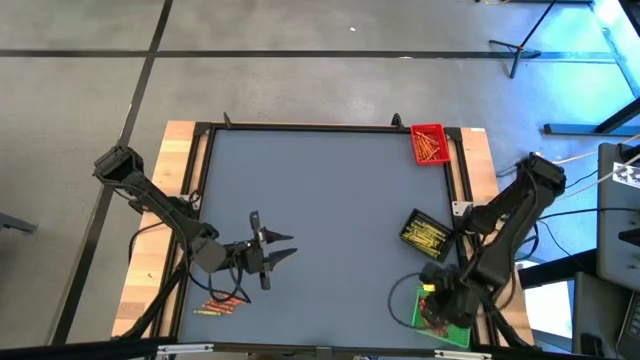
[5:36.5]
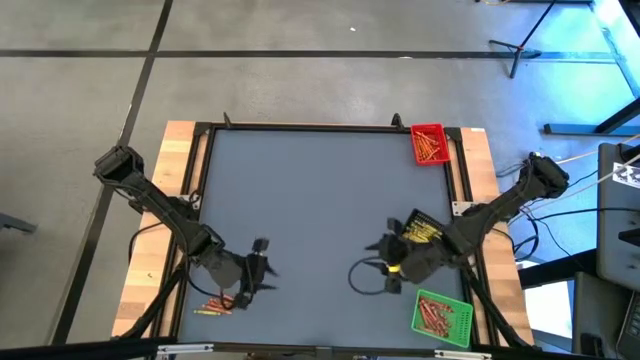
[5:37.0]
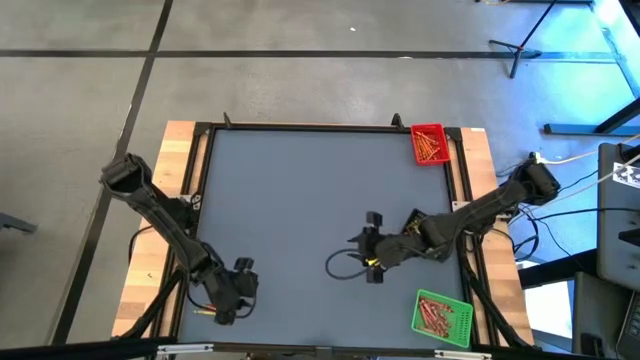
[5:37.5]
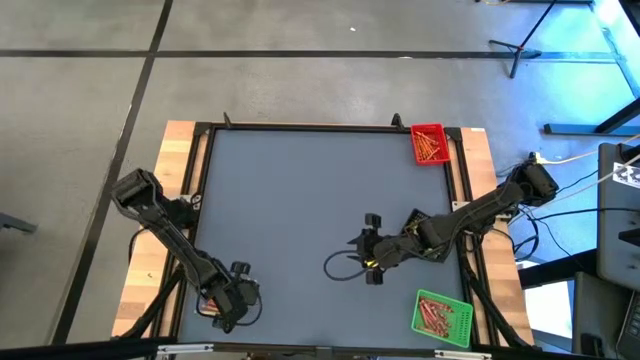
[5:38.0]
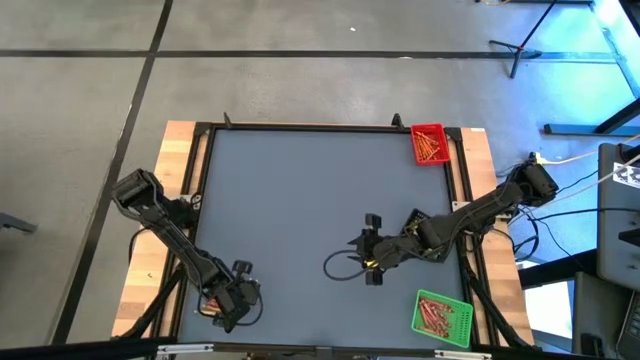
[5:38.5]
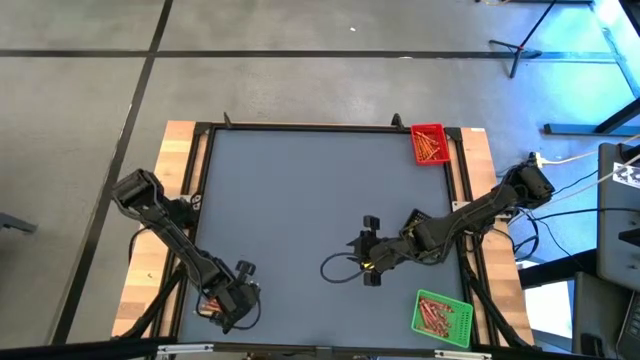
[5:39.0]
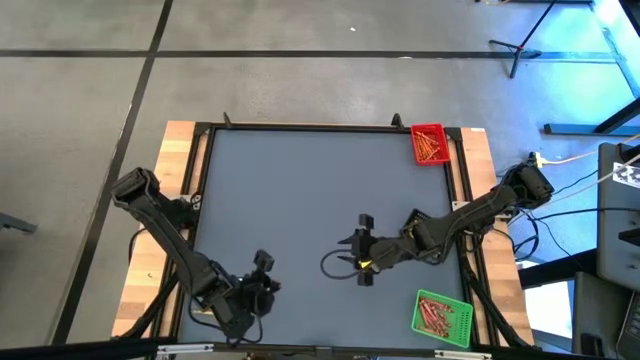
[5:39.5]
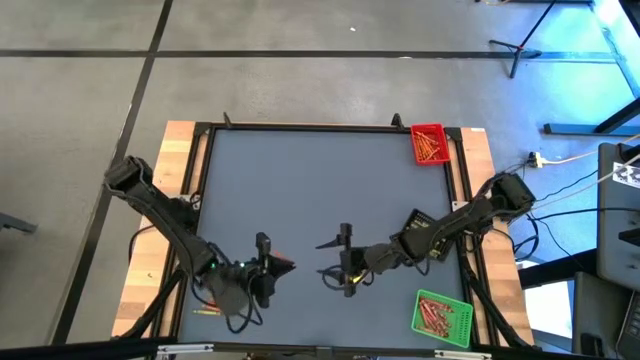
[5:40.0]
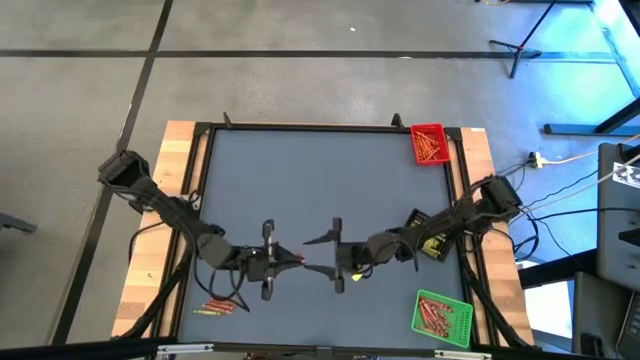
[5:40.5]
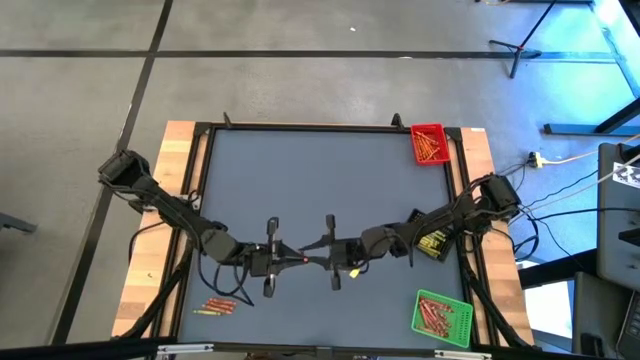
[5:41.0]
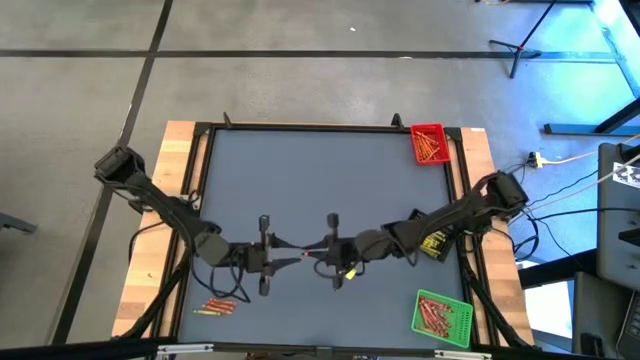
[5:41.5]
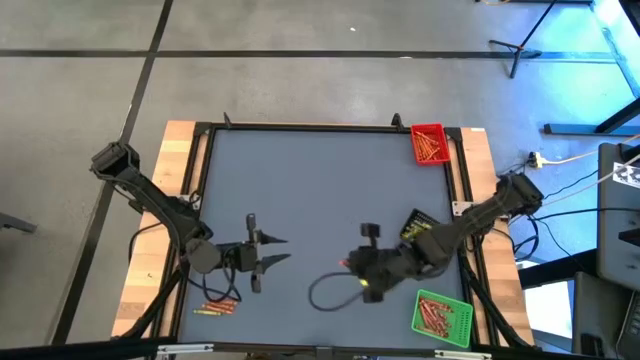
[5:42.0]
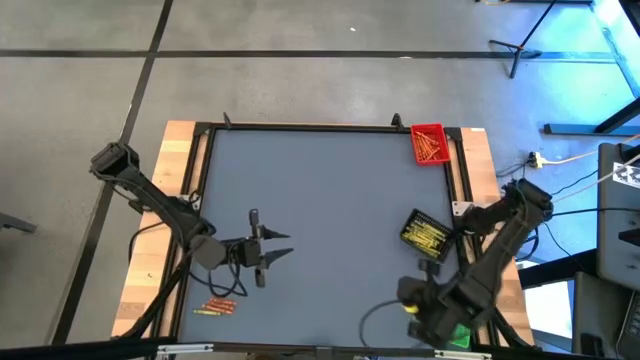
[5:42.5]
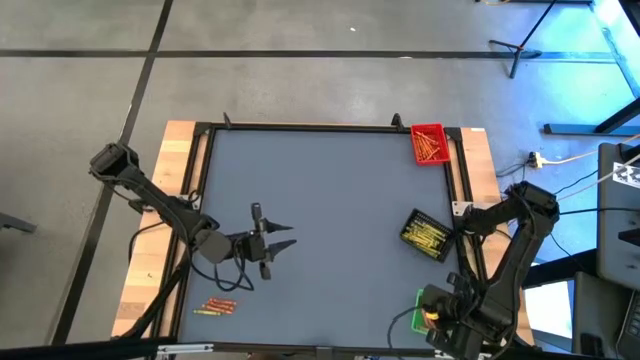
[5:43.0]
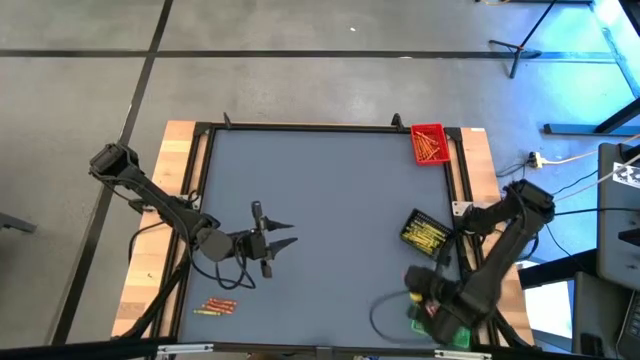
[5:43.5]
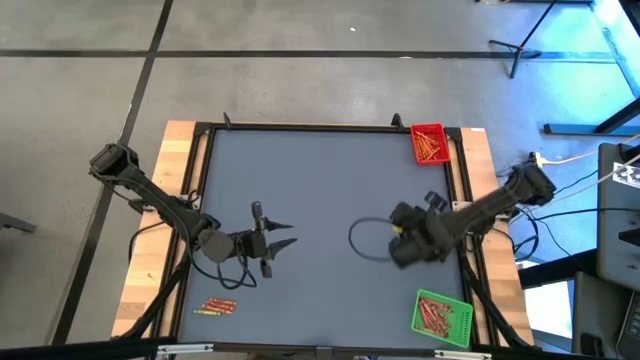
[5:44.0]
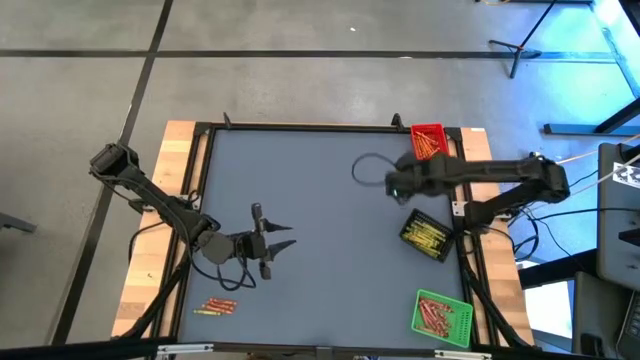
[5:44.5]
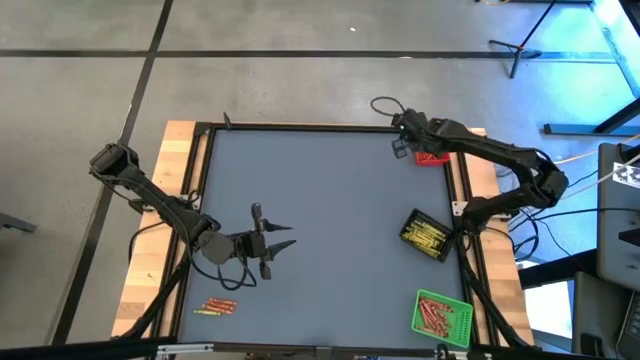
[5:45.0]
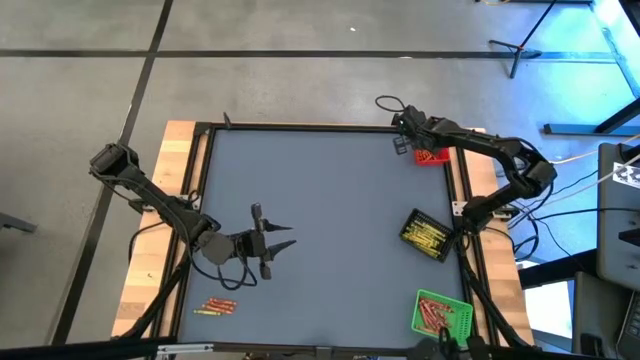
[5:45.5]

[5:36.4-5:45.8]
Task: Sort crayons
Put the orange crayon into the red basket

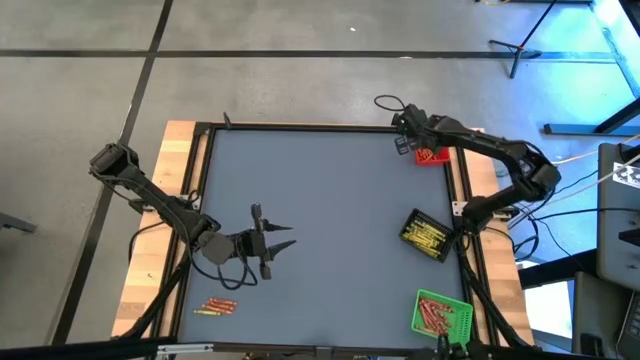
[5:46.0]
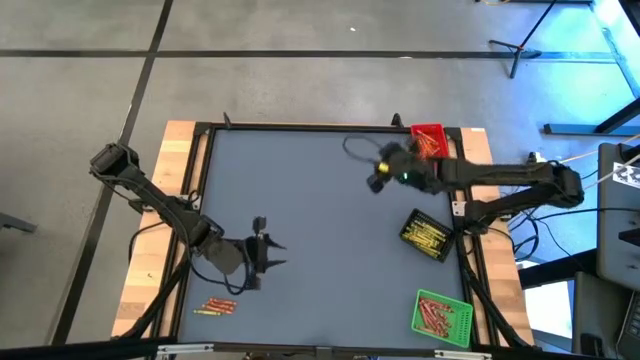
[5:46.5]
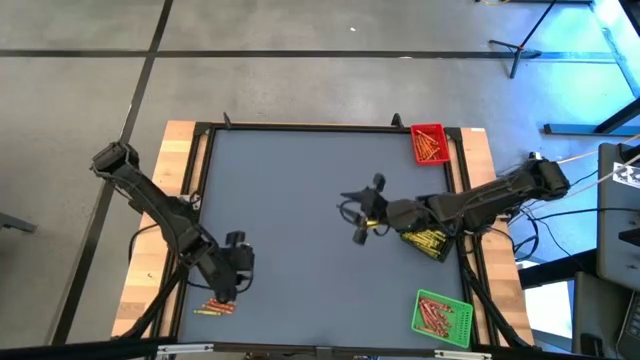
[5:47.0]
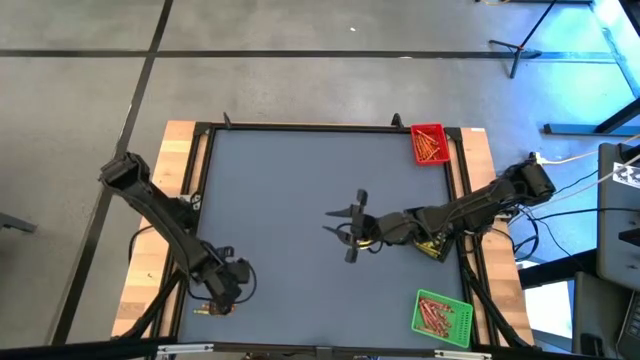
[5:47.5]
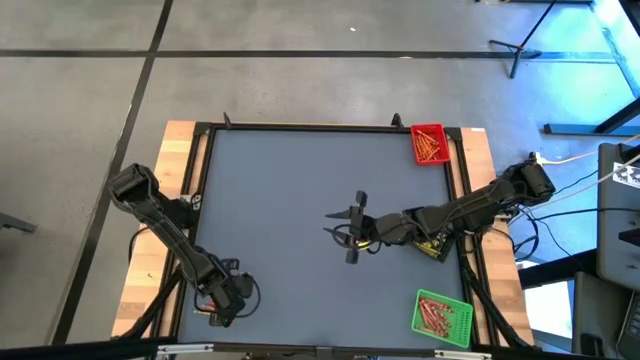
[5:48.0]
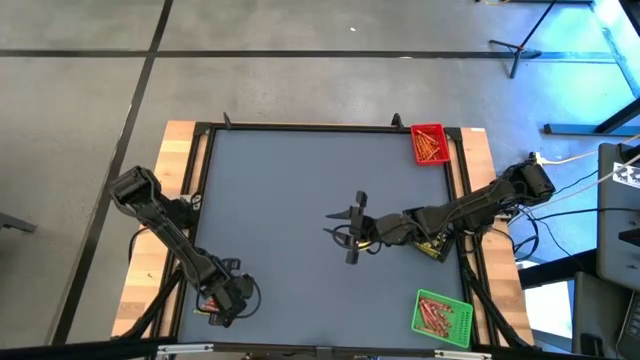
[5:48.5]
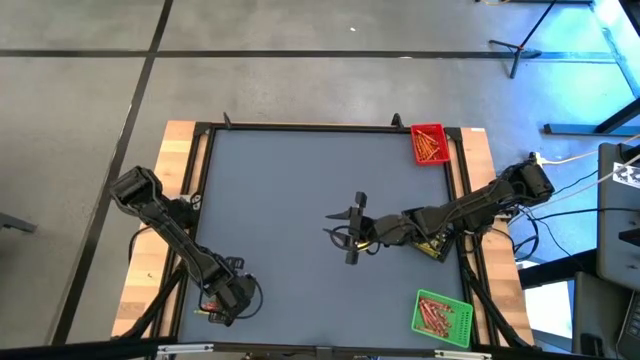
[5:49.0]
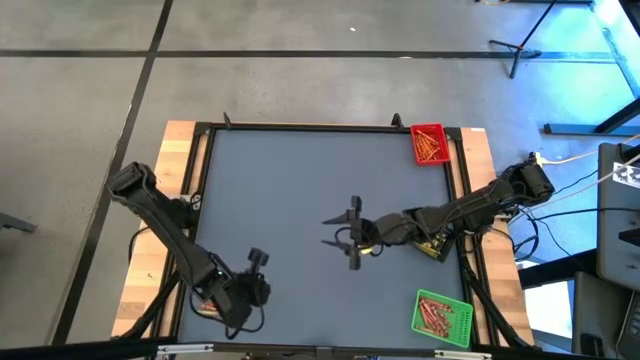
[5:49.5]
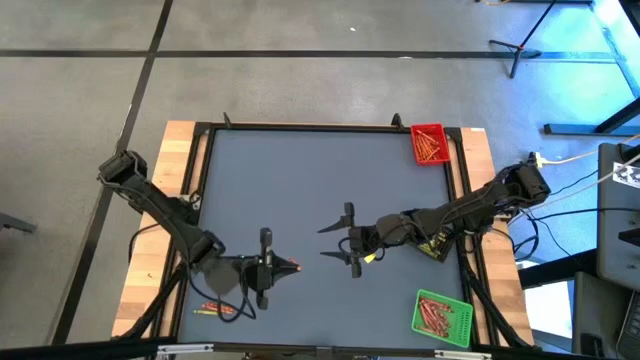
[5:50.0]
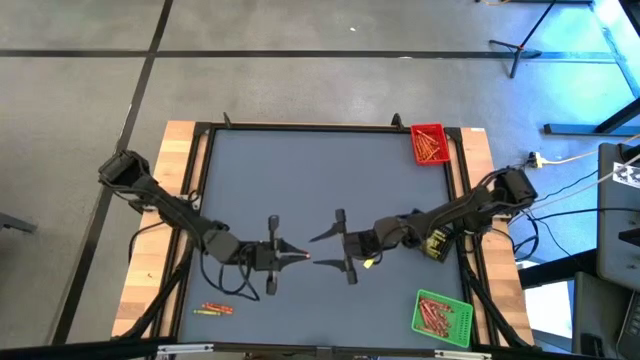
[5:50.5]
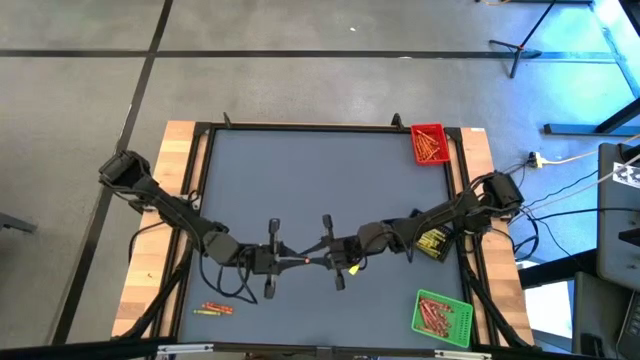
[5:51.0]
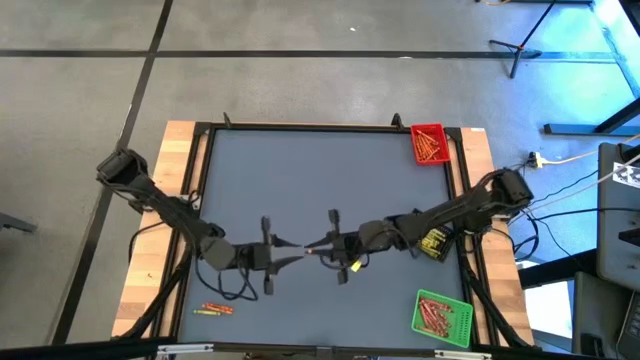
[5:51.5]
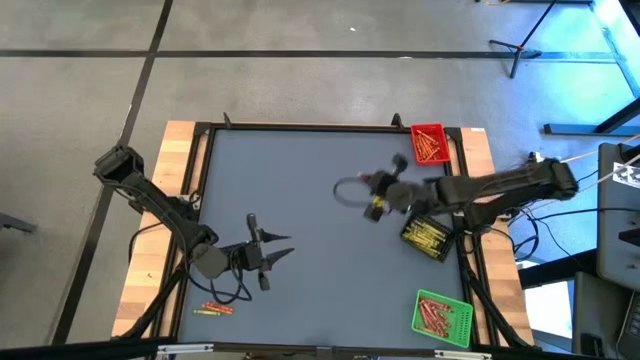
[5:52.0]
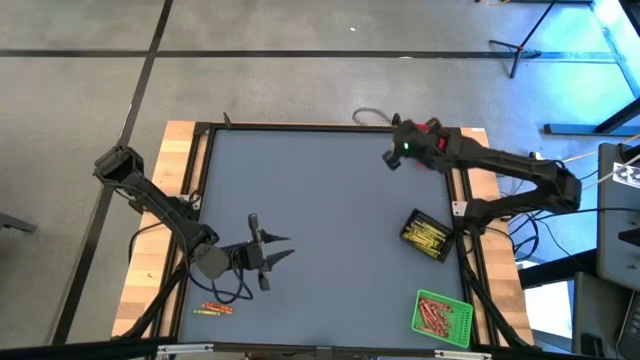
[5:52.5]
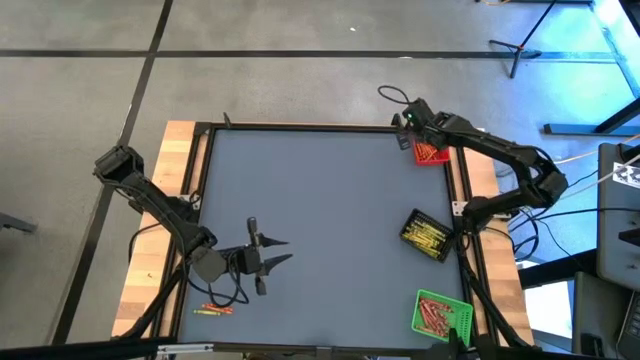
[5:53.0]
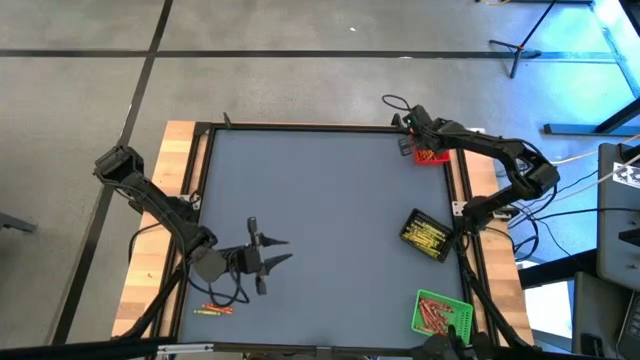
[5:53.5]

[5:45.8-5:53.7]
Put the orange crayon into the red basket

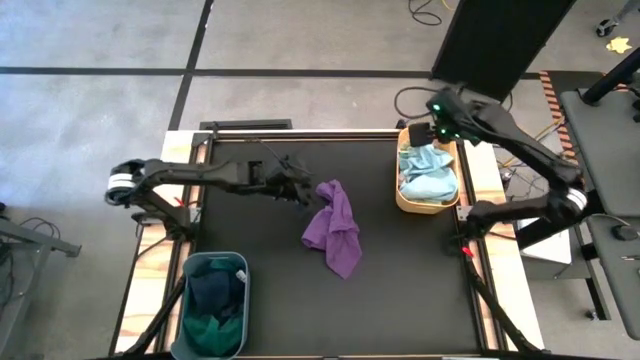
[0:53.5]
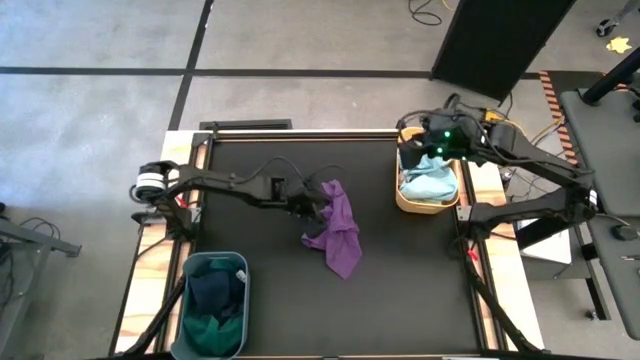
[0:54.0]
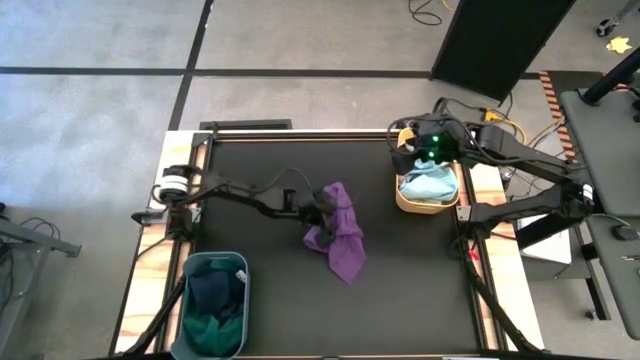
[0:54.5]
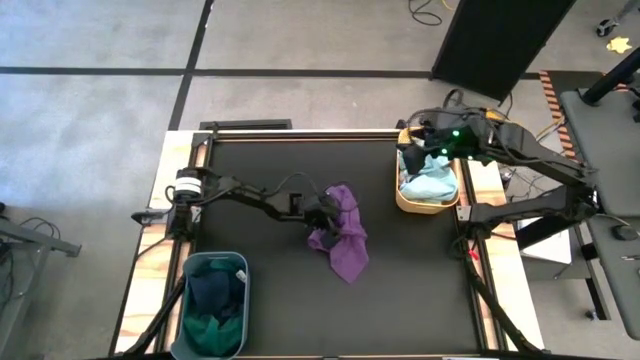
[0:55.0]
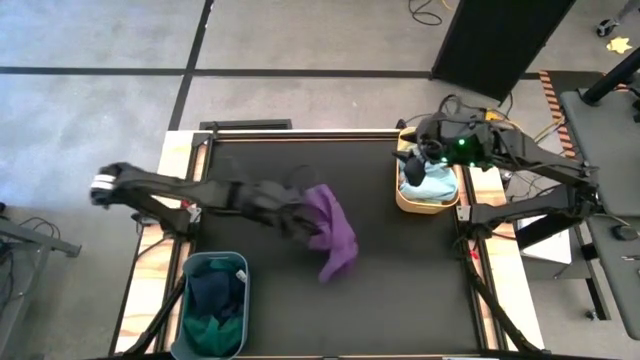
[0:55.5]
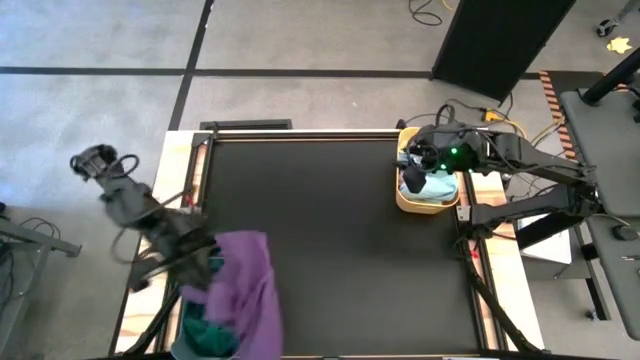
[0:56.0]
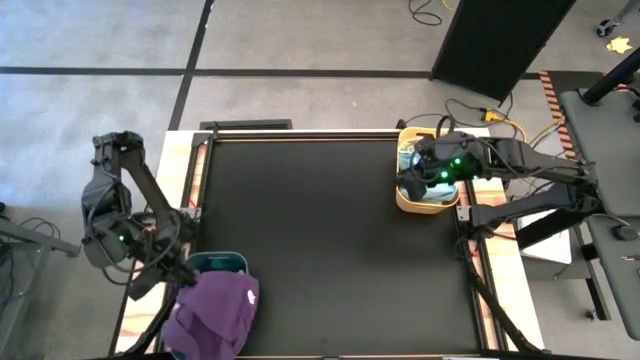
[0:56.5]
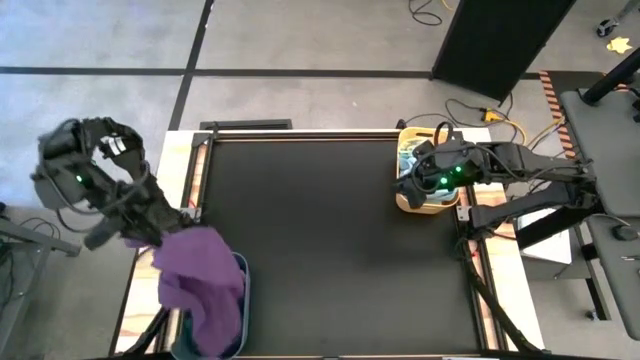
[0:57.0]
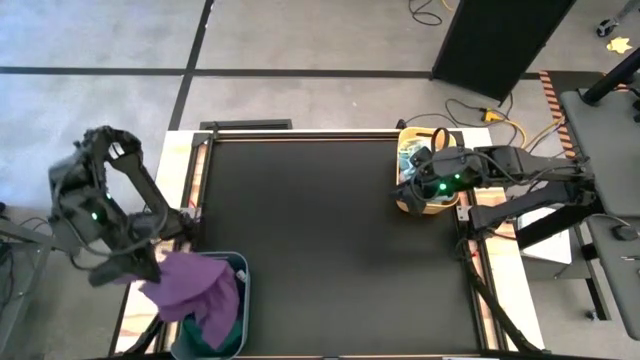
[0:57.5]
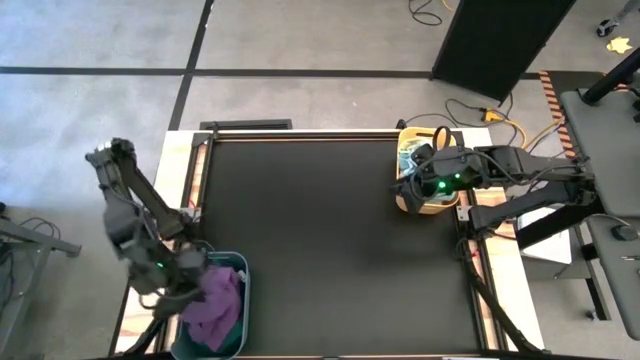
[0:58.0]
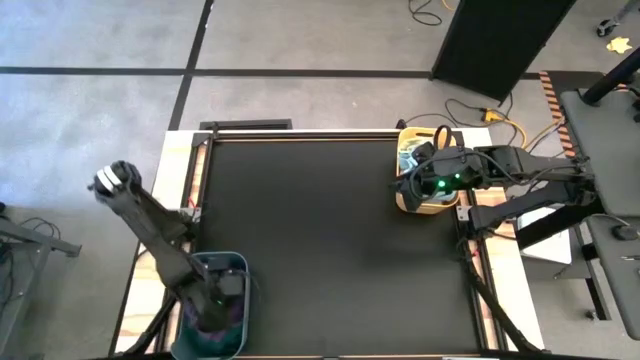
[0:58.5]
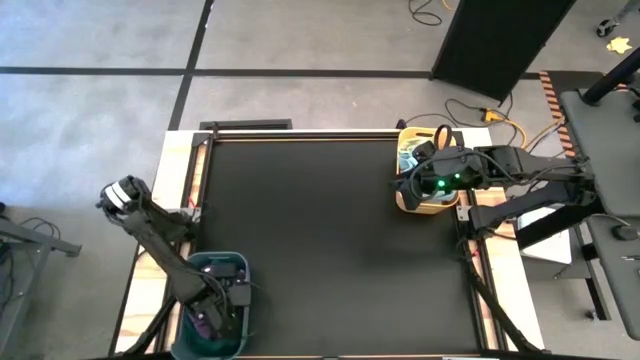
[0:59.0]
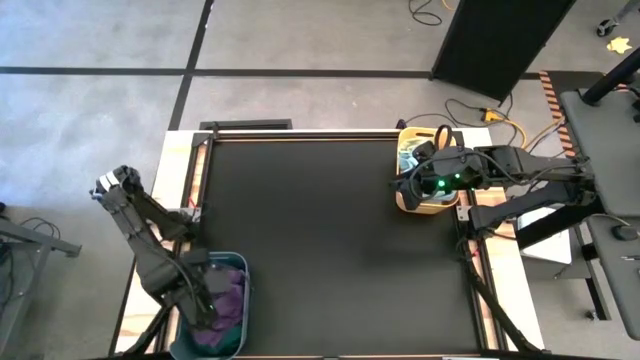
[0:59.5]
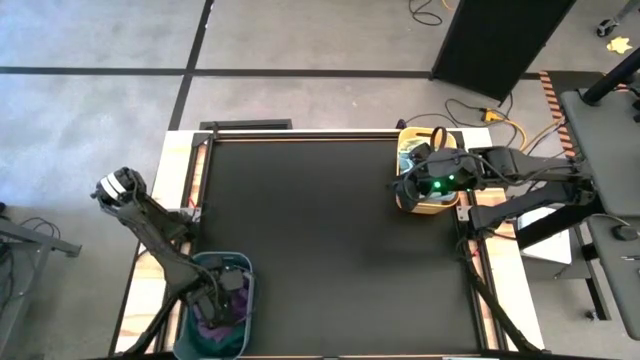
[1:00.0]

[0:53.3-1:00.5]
Task: Sort microfiber towel by color & place in baskets
Put the purple microfiber towel into the green bin
